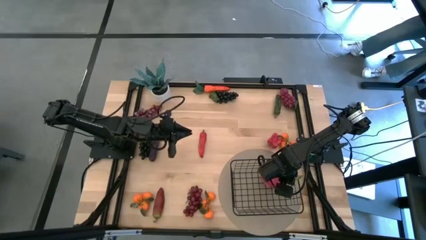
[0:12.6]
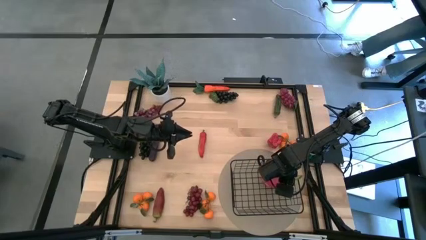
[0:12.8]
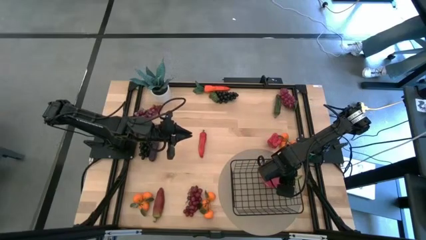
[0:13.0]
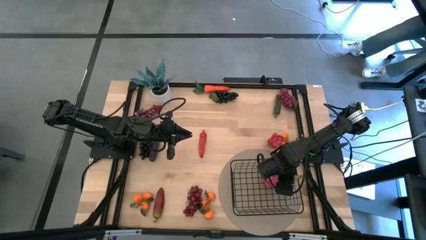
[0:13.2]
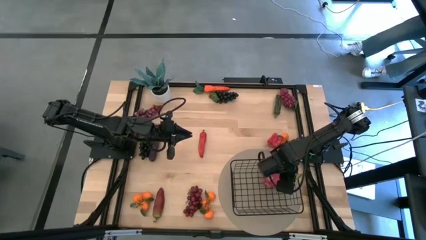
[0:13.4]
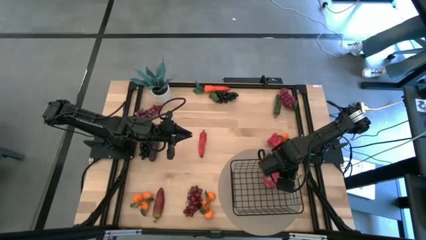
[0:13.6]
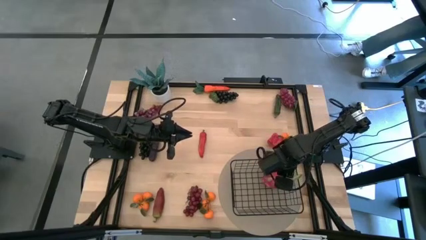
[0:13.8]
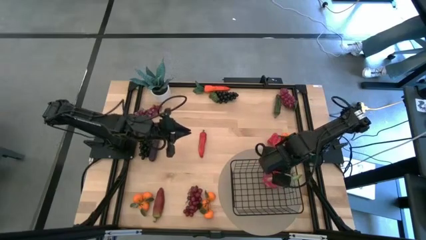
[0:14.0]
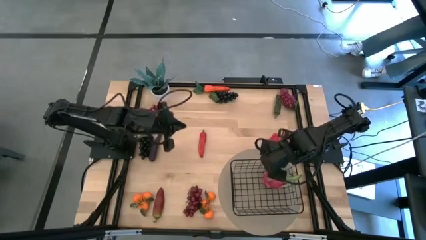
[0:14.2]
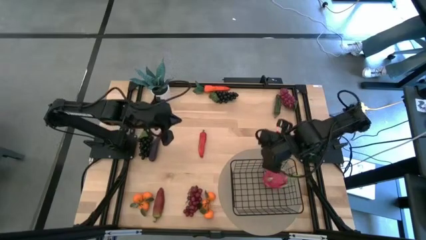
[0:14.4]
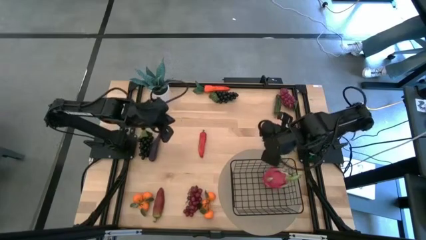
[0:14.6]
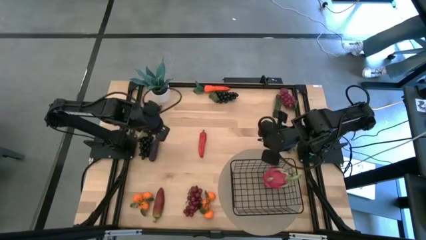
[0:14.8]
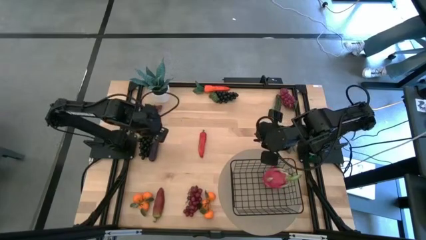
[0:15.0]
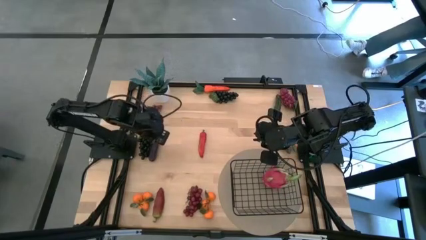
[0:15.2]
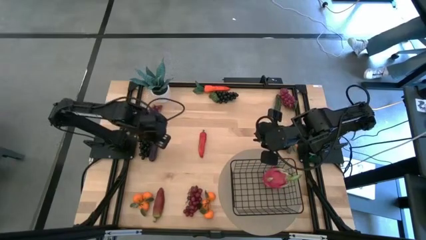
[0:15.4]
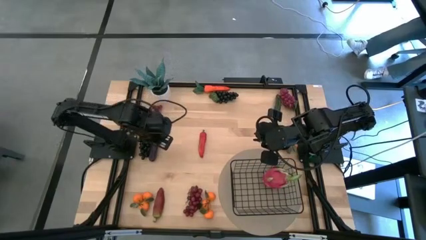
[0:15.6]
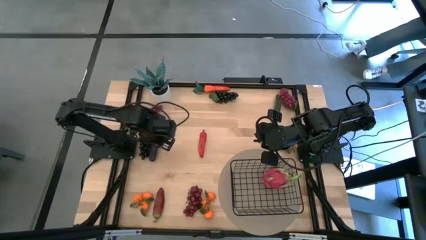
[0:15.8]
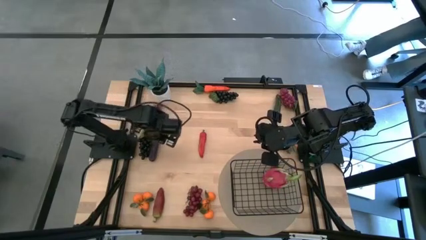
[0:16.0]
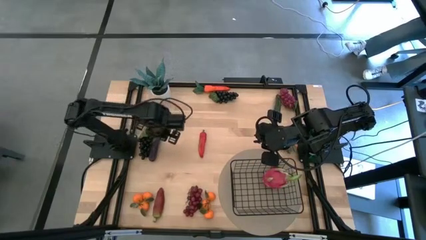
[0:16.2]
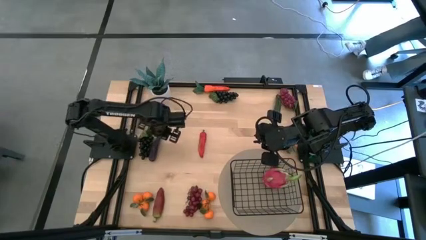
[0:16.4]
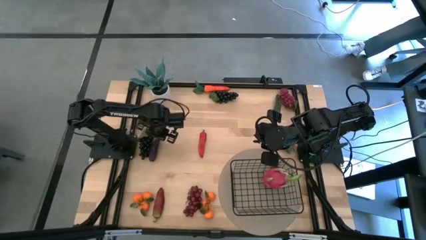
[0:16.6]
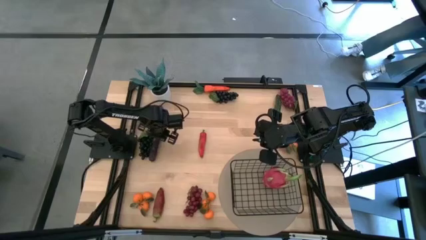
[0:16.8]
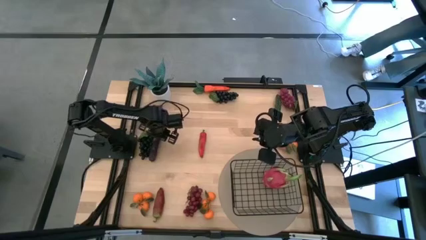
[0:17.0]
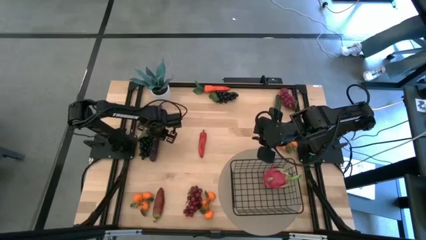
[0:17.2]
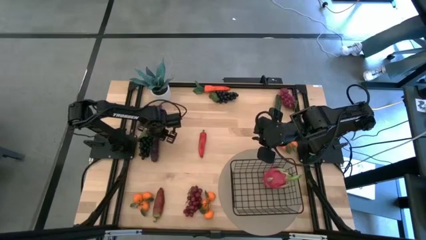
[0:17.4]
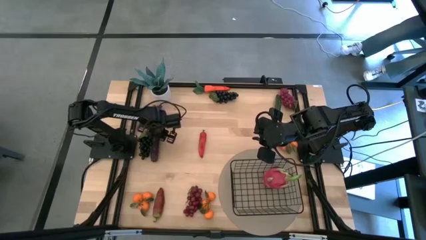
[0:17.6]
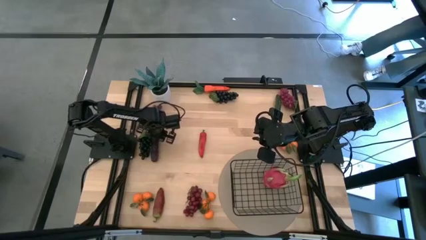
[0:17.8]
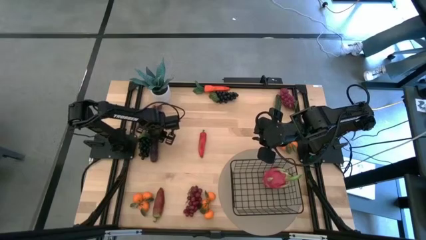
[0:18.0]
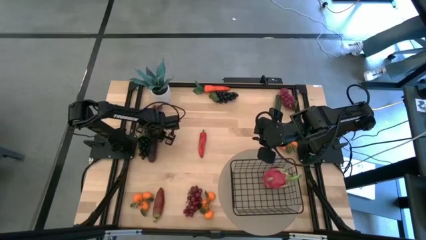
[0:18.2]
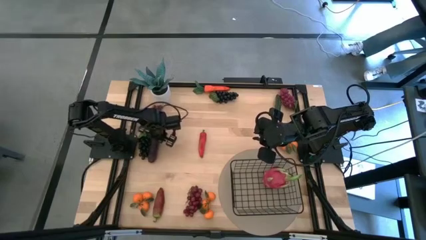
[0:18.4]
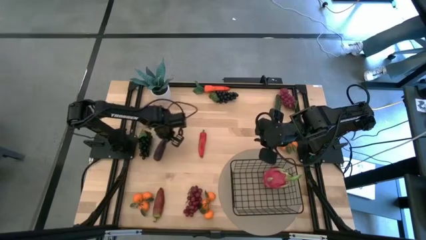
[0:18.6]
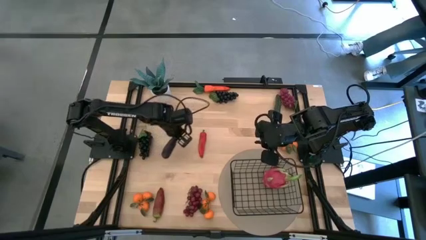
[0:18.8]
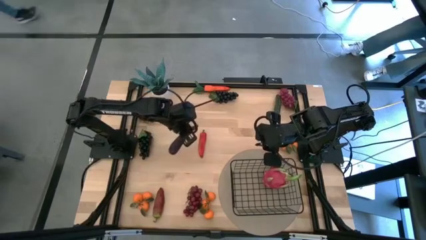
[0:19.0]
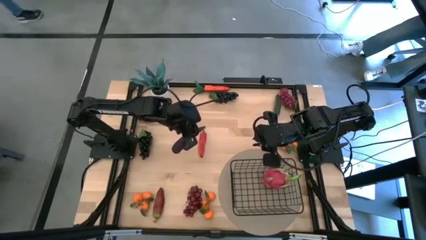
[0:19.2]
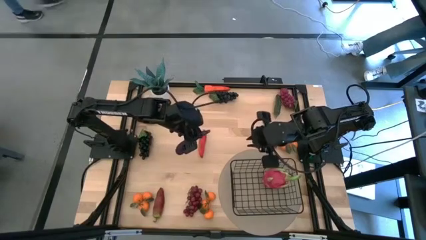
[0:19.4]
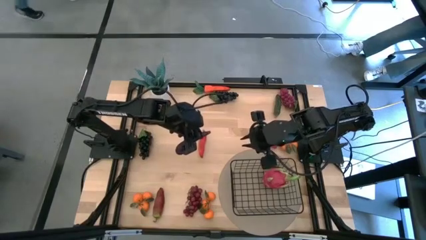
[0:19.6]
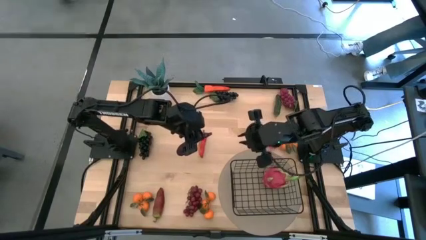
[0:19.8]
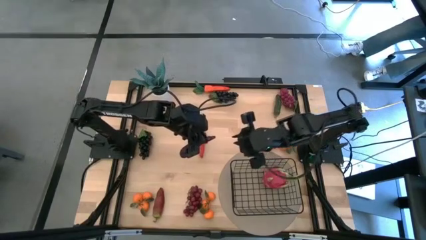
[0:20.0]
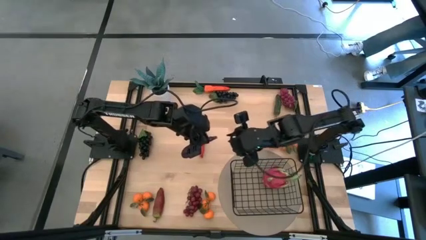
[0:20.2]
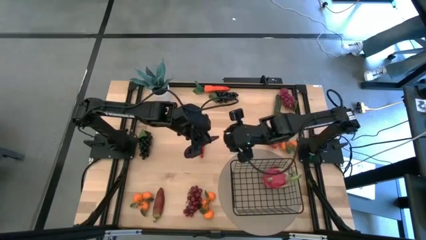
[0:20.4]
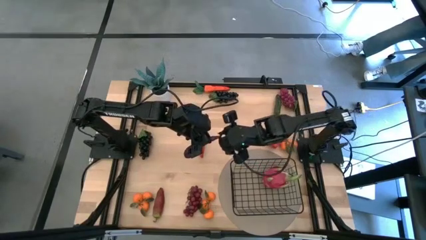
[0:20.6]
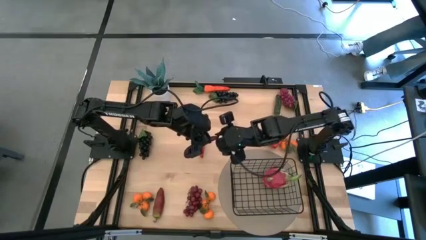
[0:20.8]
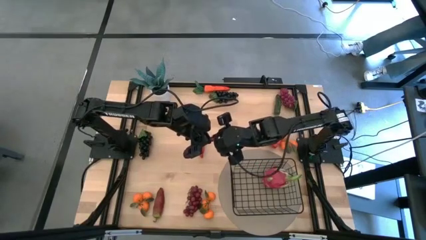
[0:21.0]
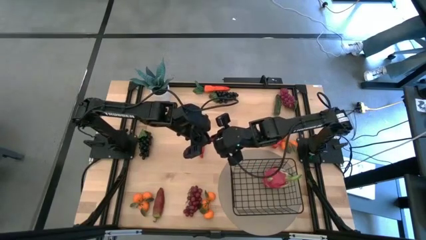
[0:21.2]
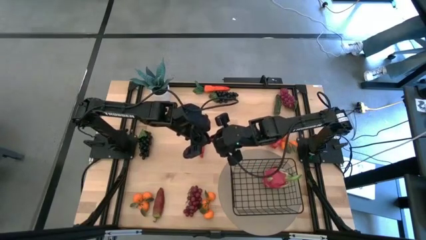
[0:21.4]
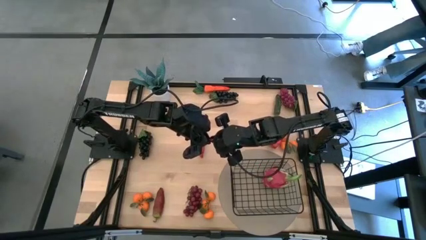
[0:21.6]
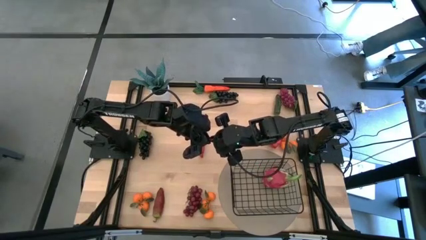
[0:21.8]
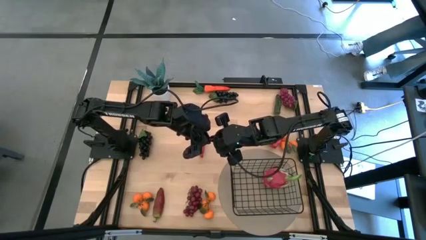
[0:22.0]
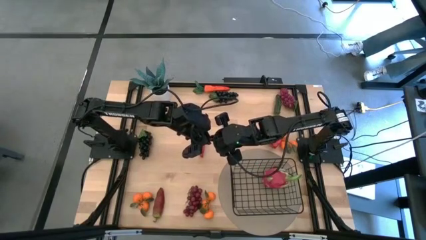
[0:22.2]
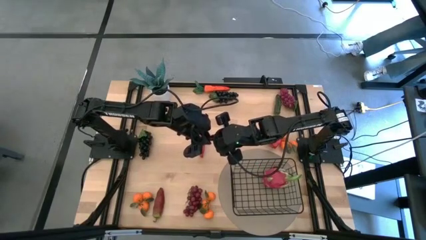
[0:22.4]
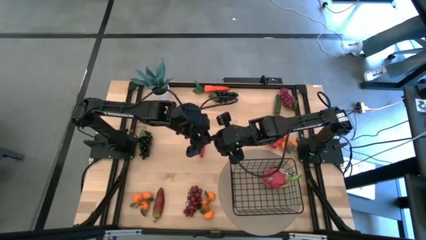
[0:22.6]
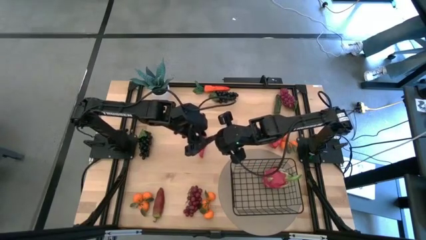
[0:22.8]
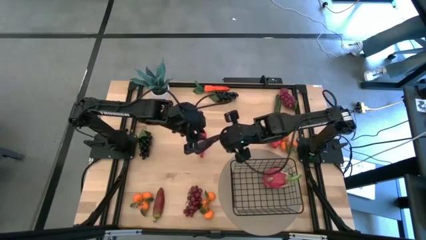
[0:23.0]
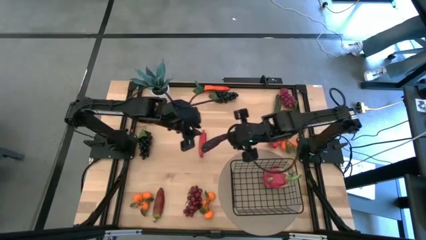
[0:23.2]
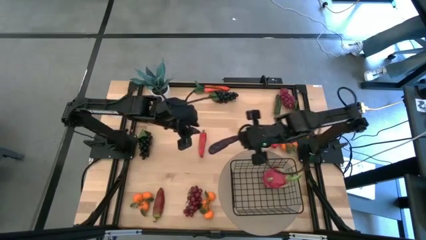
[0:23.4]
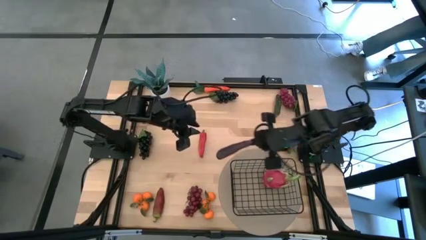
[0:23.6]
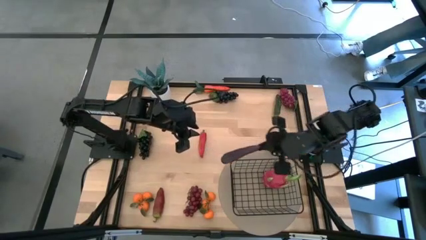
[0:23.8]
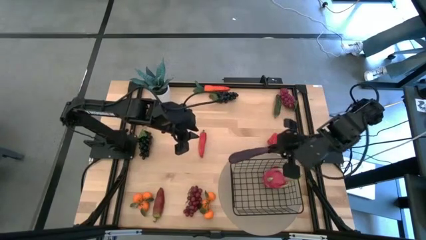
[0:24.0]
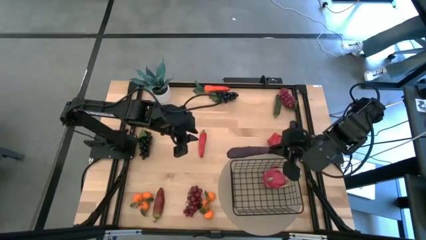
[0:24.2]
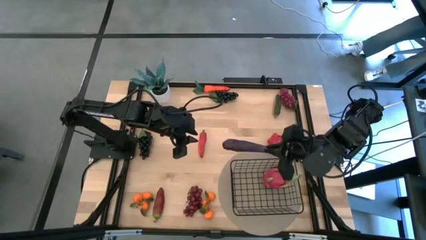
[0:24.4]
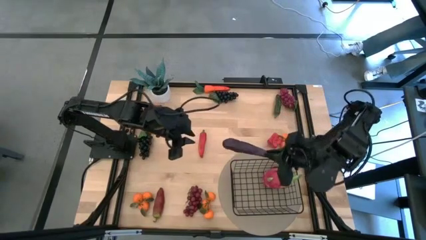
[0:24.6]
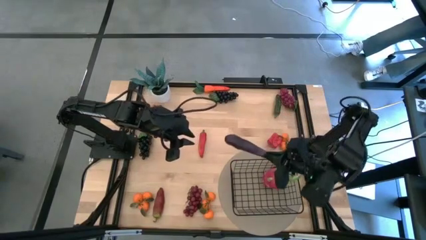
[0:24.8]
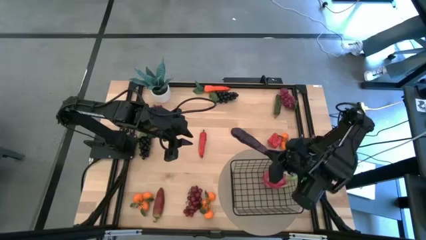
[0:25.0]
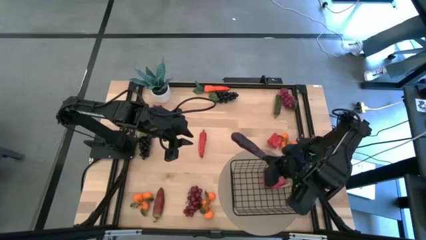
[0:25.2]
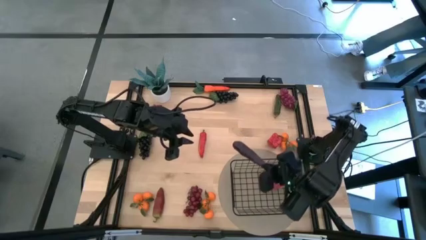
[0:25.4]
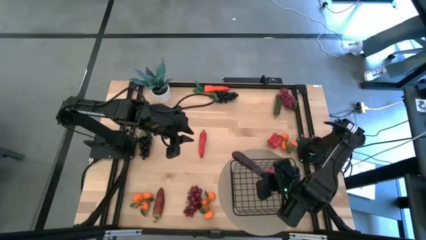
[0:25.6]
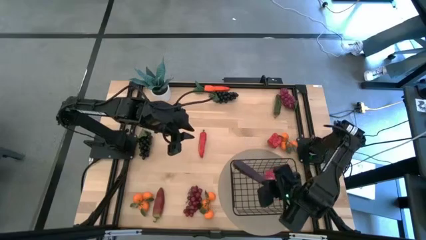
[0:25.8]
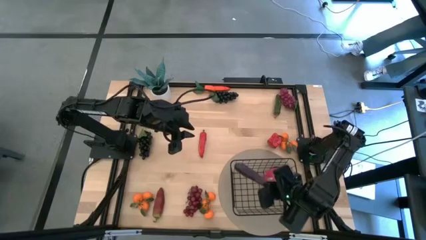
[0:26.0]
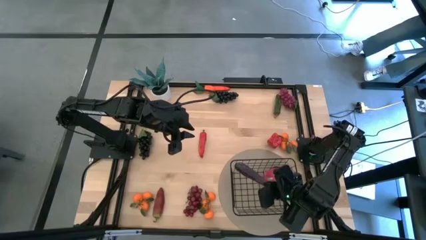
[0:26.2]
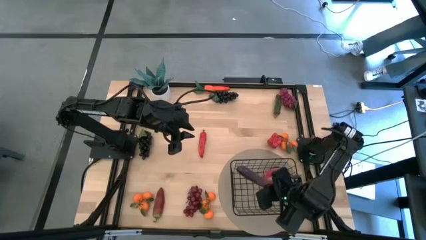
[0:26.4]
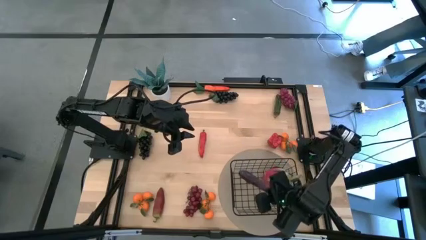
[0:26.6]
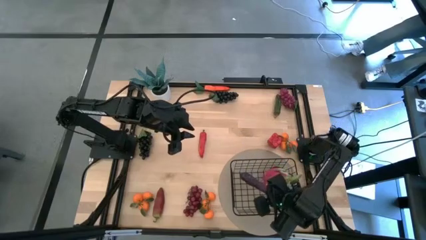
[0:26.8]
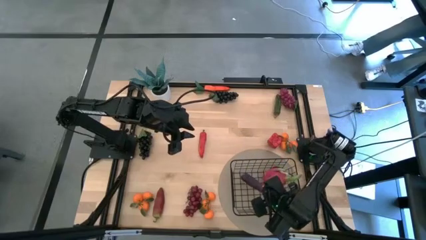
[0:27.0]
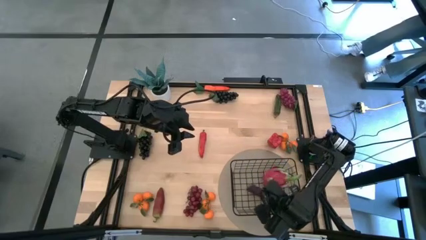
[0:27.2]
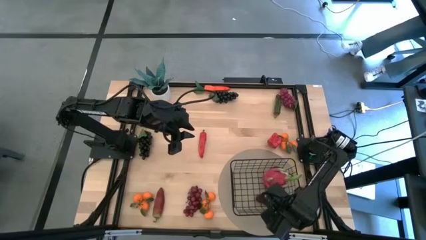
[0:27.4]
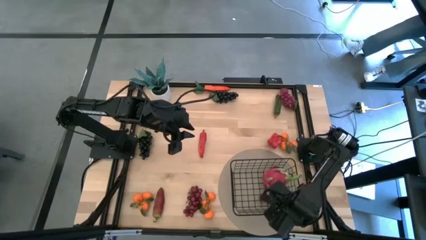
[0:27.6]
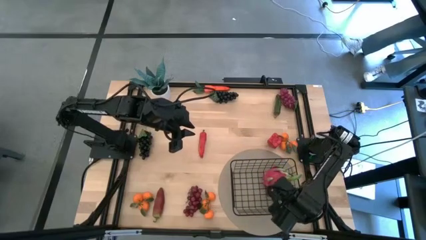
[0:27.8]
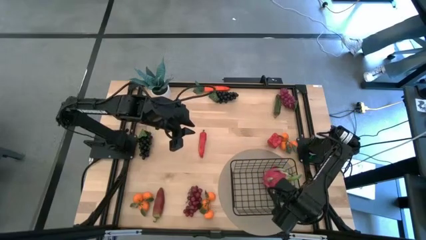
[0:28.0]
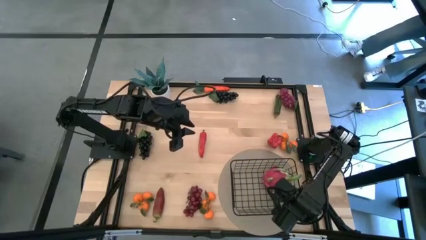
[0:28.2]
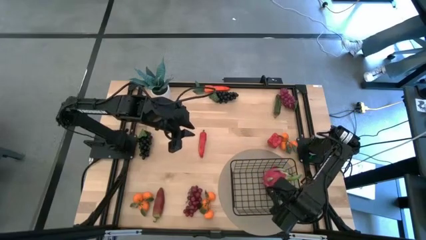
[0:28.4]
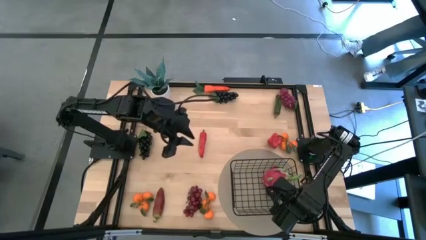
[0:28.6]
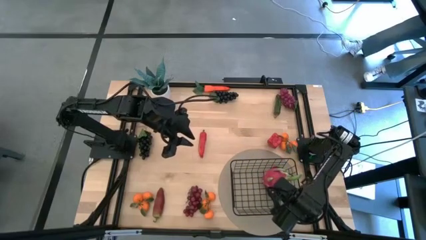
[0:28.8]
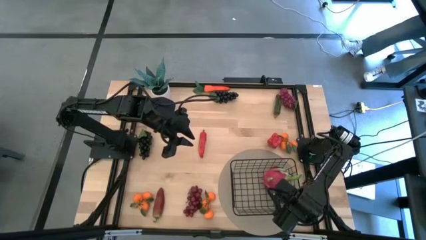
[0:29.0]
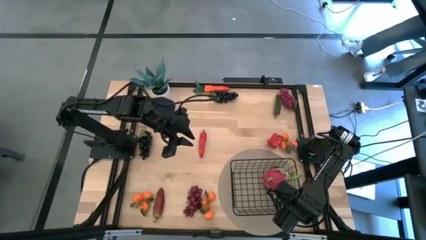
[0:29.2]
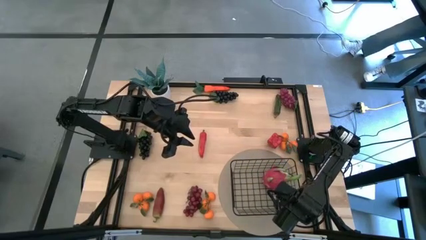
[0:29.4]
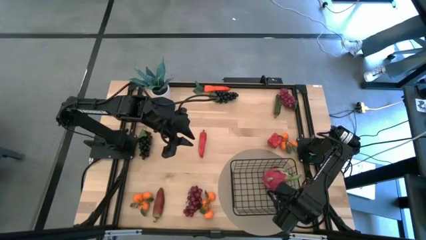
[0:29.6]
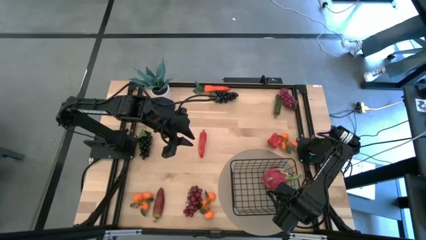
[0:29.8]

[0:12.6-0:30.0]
Task: Build produce basket
Put the eggplant into the wire basket
